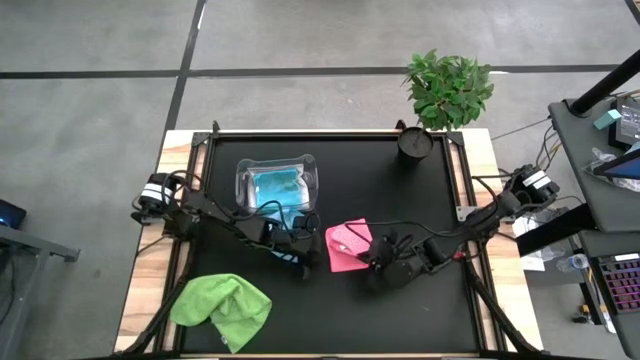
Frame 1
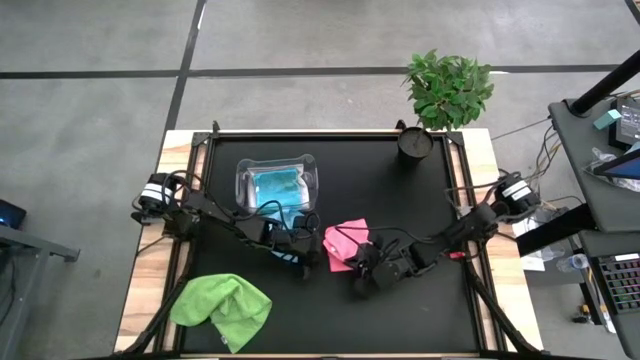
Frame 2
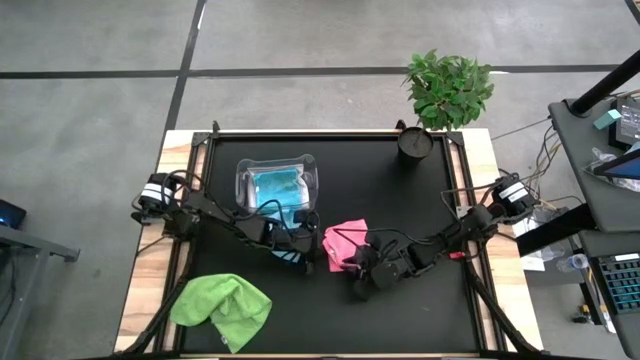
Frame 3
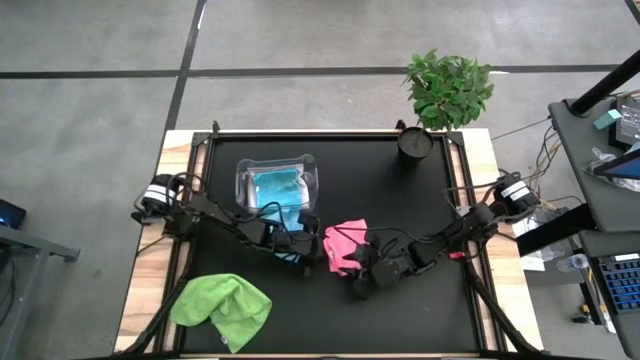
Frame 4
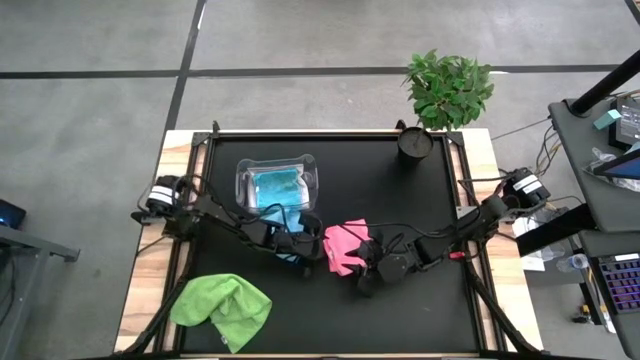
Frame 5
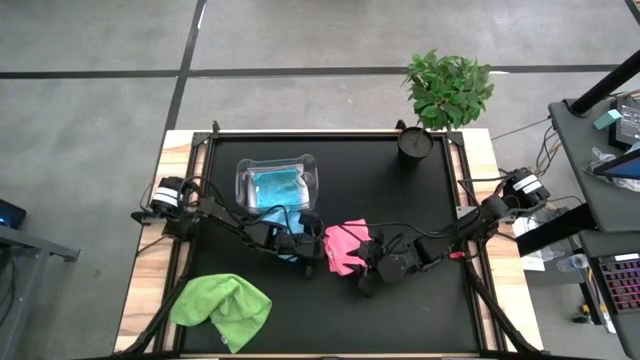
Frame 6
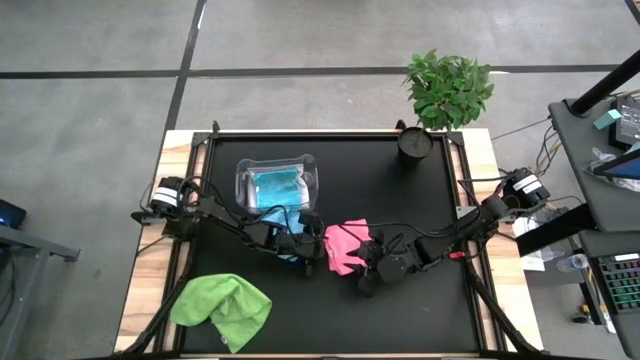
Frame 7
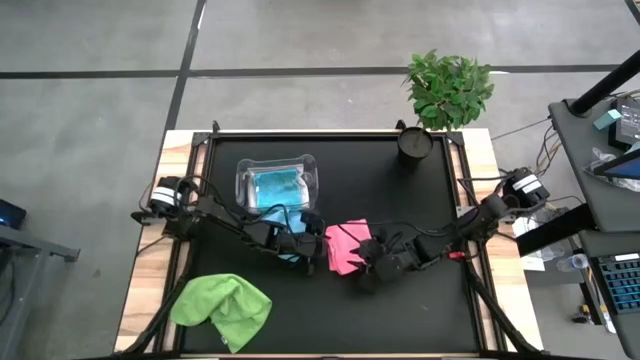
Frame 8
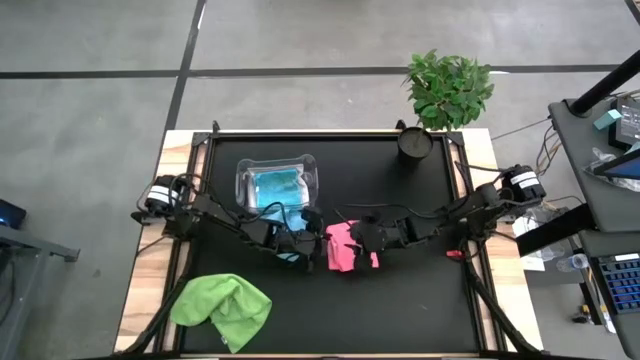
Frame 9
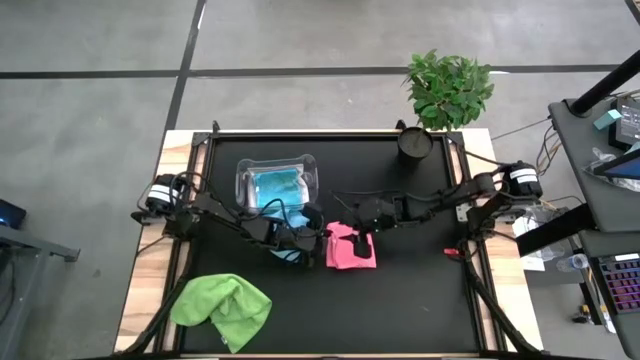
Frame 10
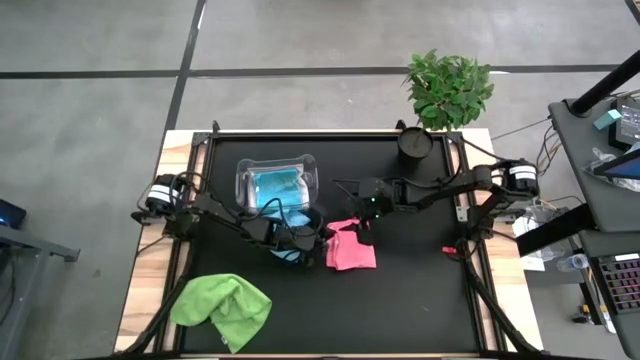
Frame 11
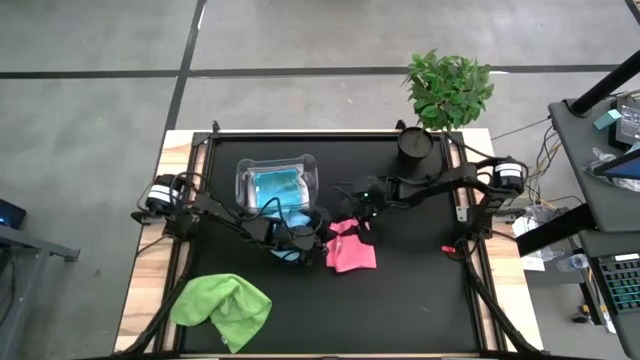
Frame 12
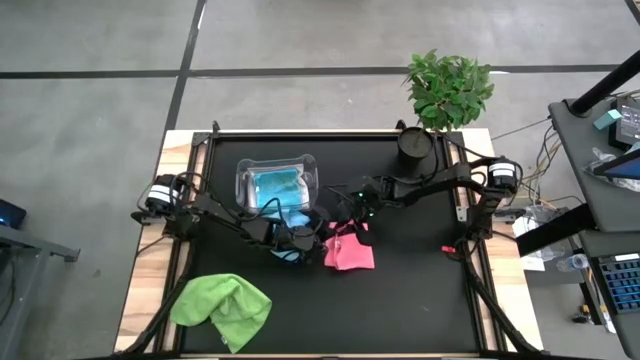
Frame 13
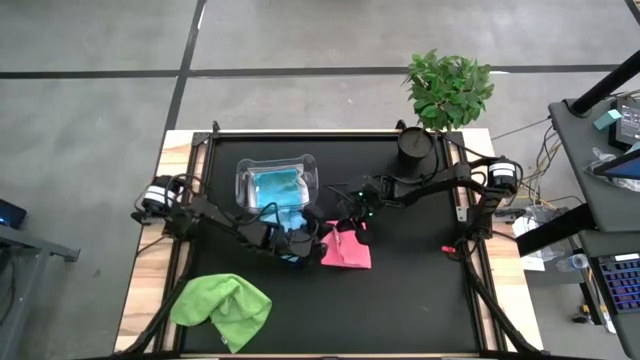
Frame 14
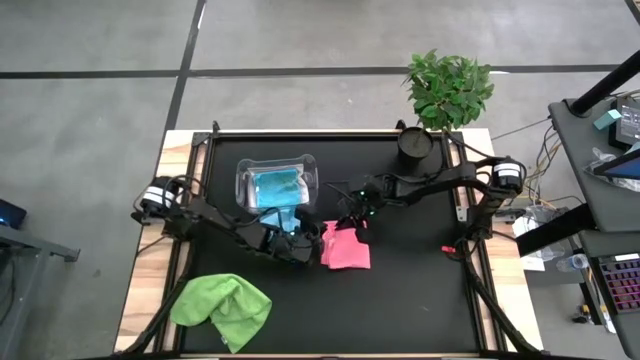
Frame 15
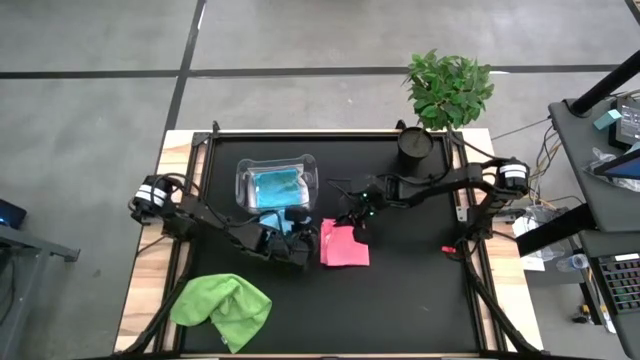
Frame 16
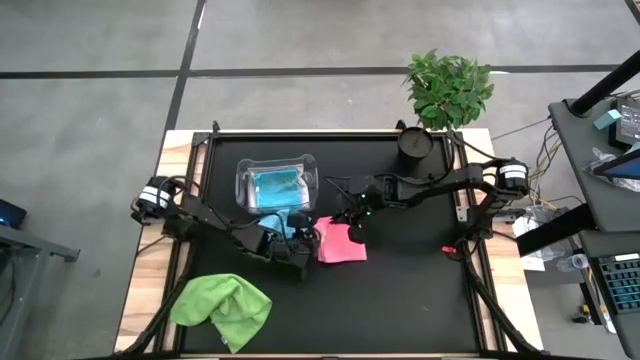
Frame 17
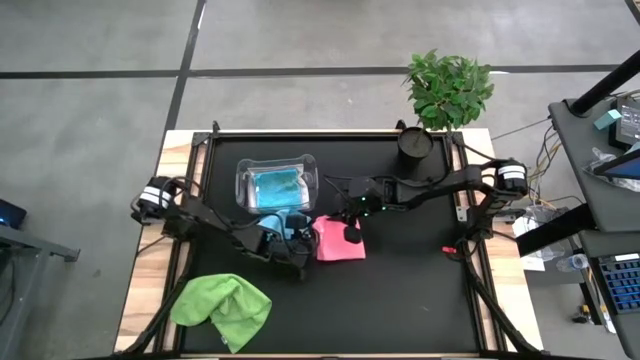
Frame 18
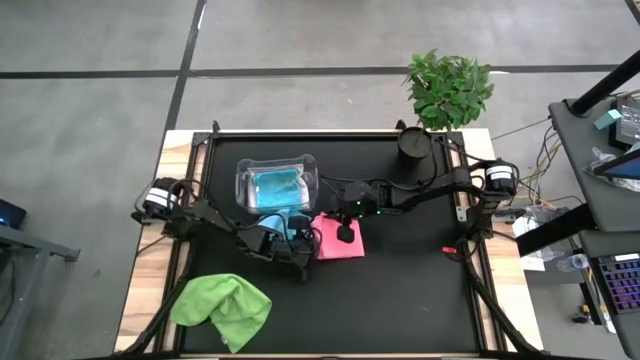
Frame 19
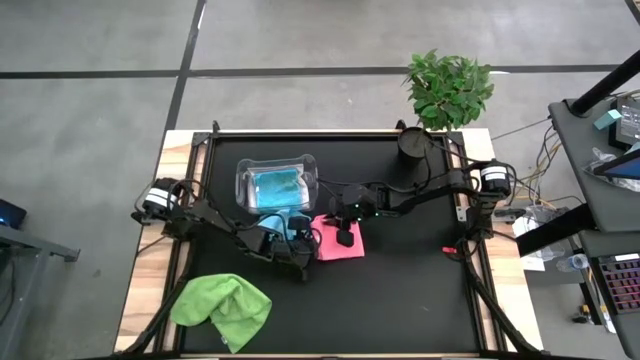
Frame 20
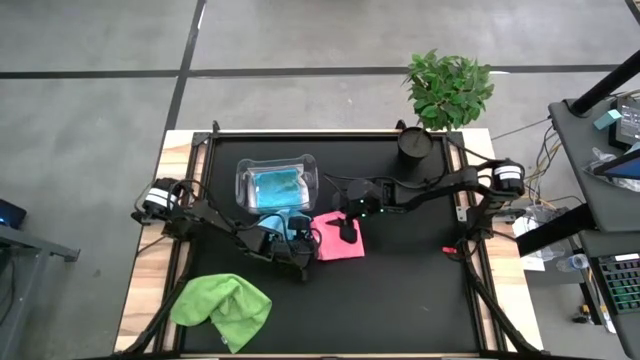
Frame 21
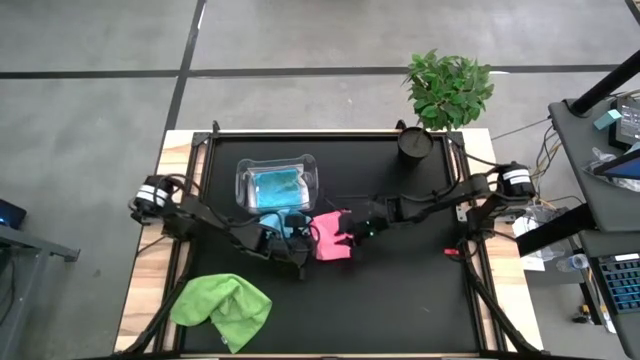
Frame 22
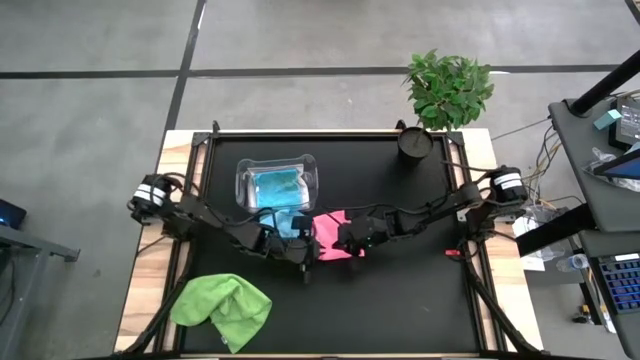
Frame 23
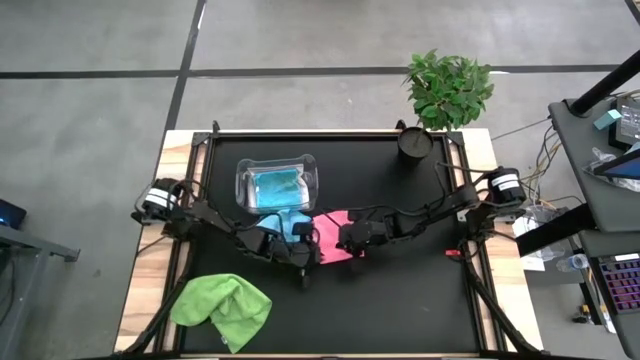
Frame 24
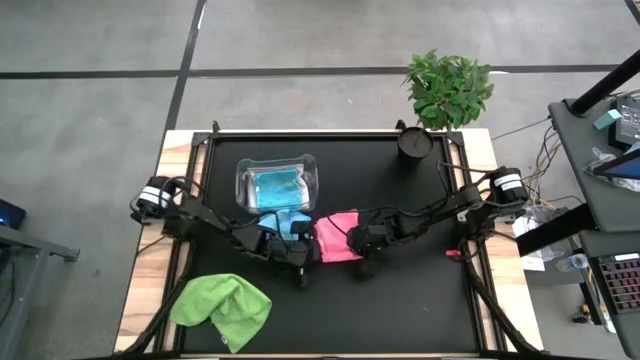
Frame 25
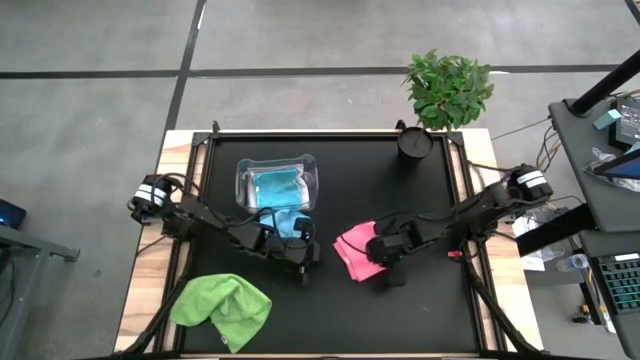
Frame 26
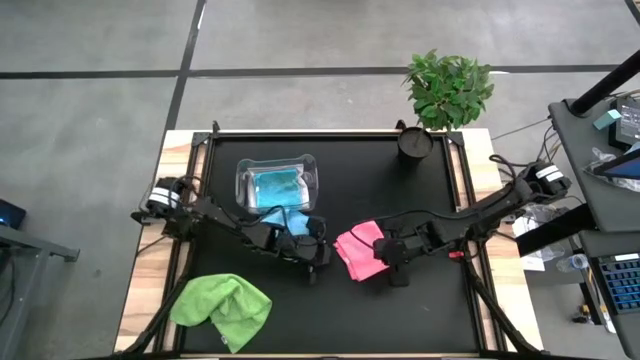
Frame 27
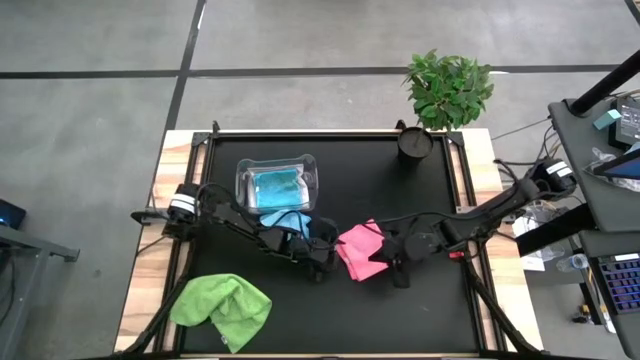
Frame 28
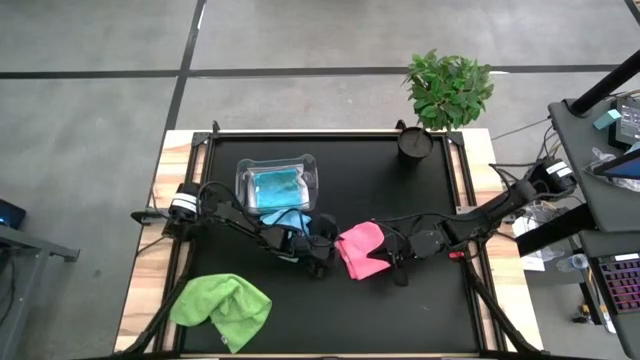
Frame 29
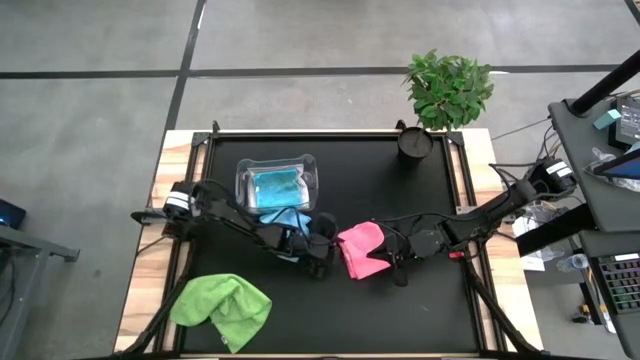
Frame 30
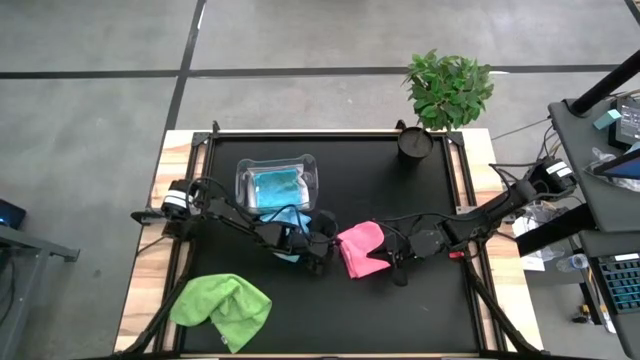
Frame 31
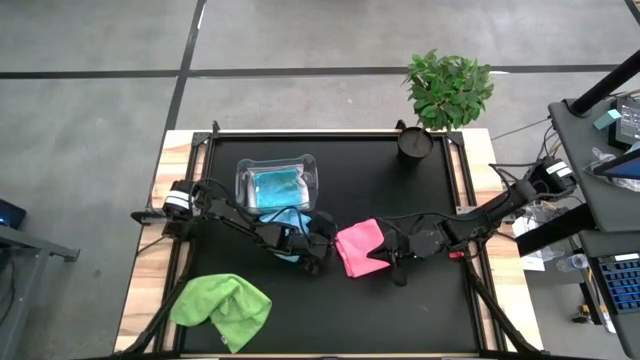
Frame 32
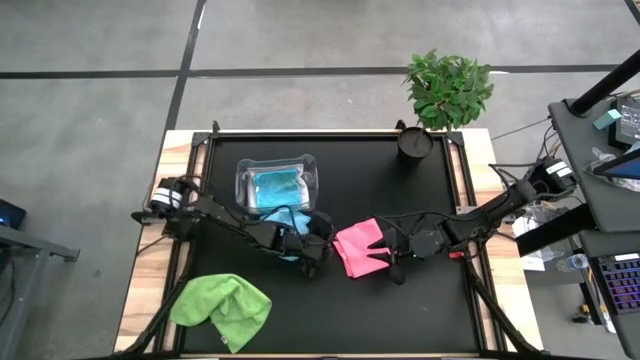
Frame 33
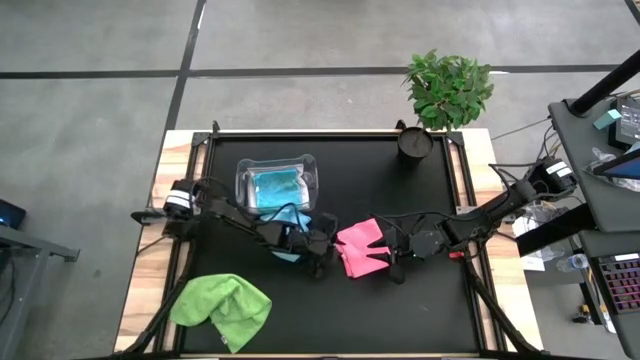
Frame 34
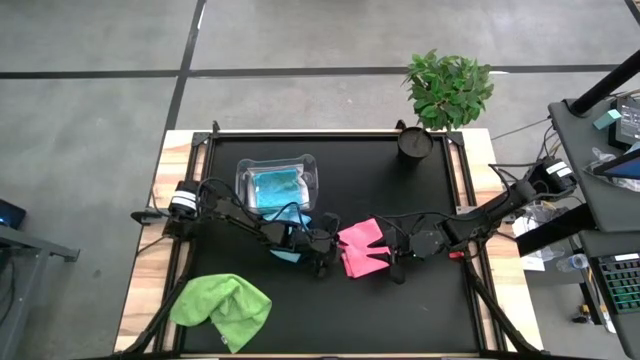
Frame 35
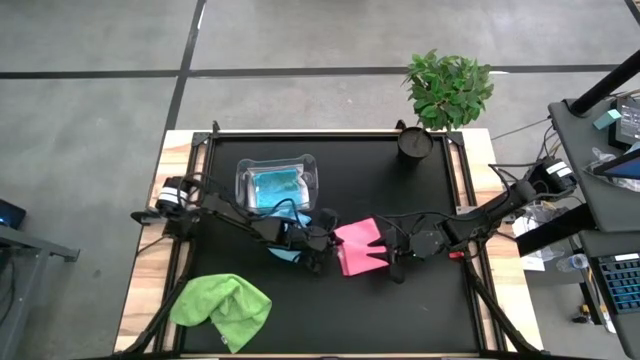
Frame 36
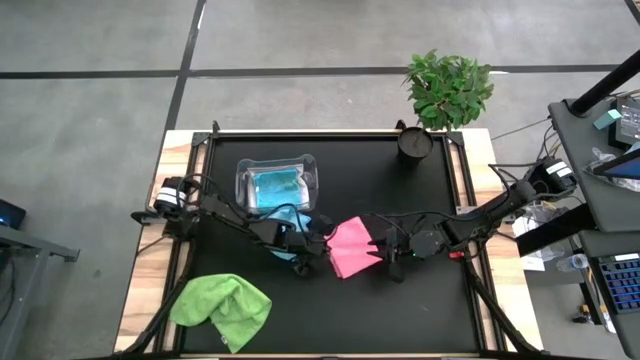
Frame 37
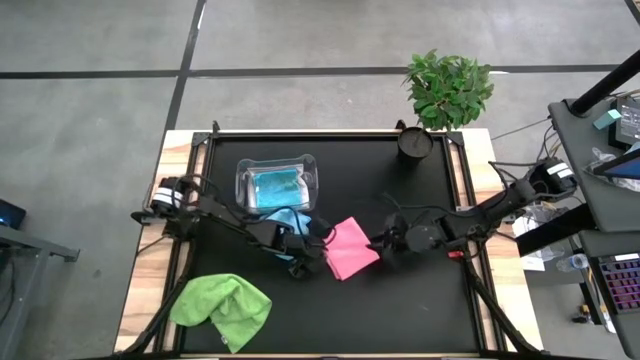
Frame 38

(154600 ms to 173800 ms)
Task: Fold microfiber towels
Fold the pink microfiber cloth

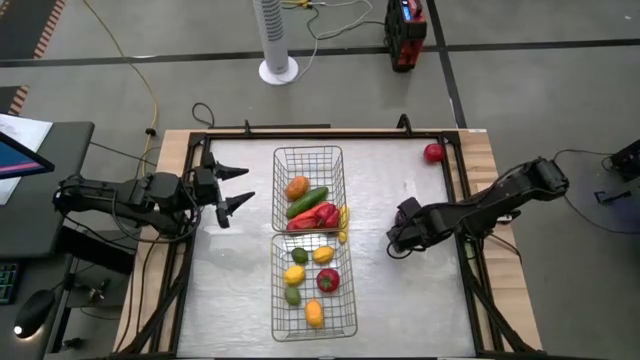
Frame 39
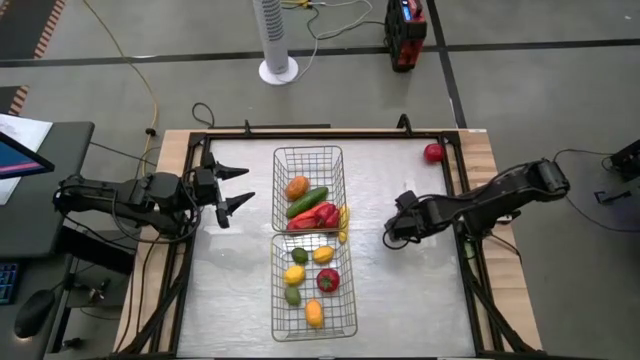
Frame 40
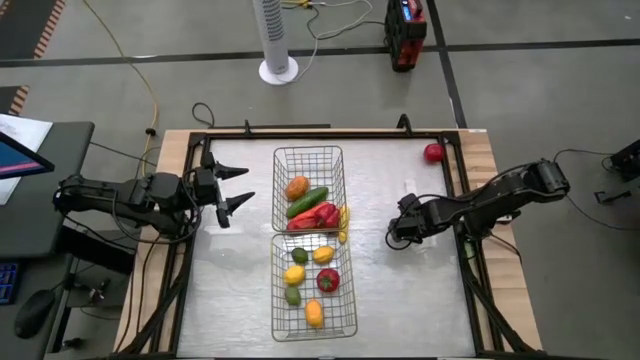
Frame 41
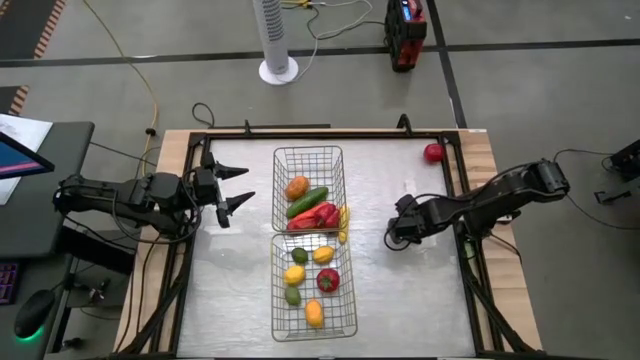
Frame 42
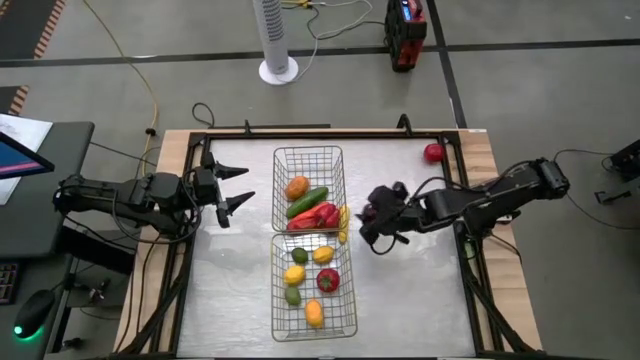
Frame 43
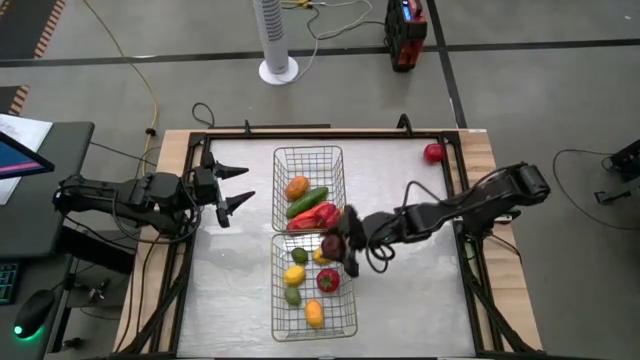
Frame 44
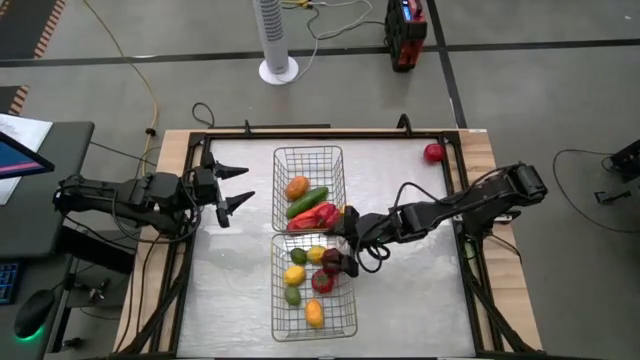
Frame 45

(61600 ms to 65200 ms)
Task: Sort produce into baskets
Put the red apple into the bottom wire basket
